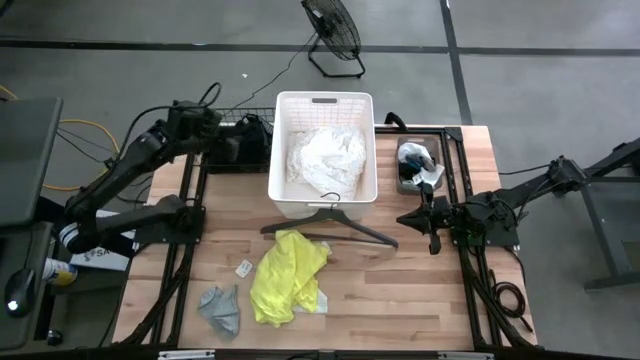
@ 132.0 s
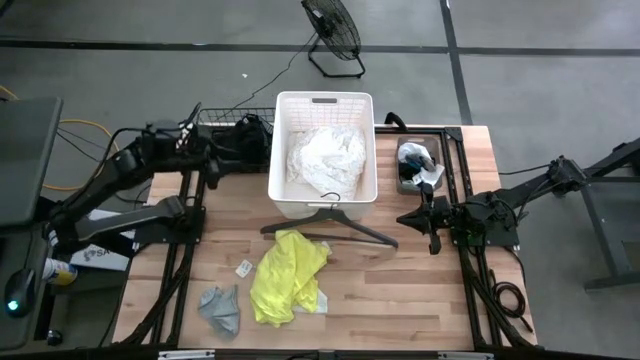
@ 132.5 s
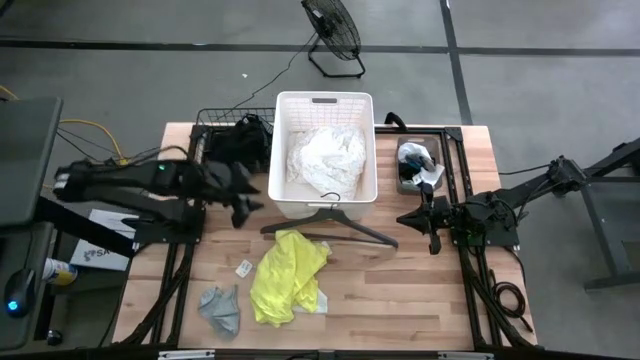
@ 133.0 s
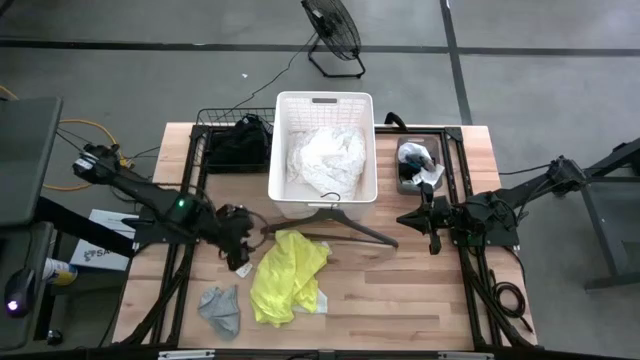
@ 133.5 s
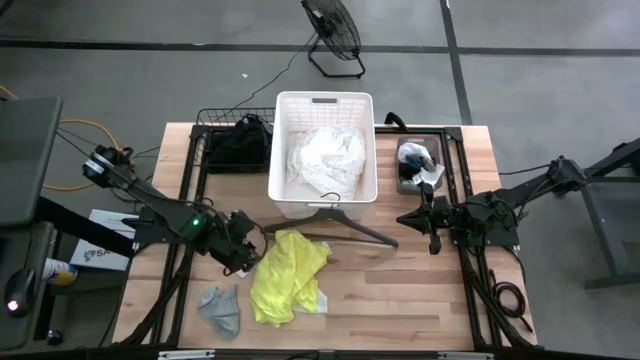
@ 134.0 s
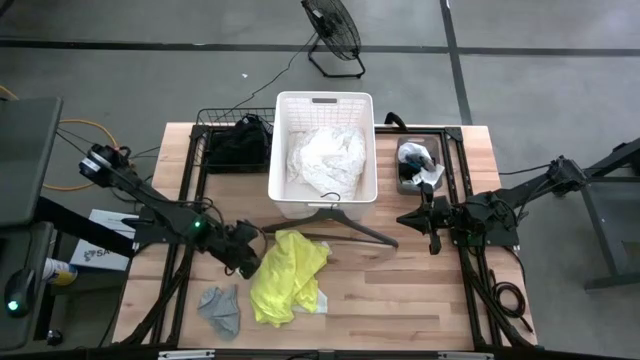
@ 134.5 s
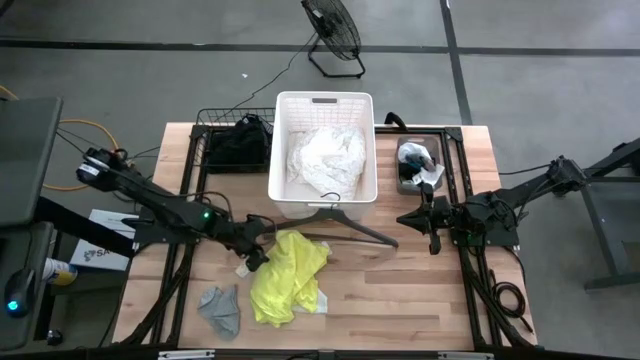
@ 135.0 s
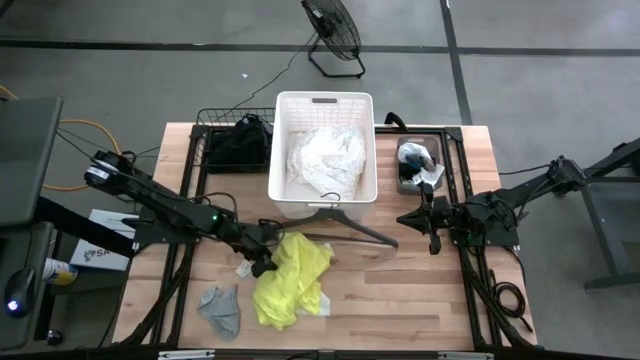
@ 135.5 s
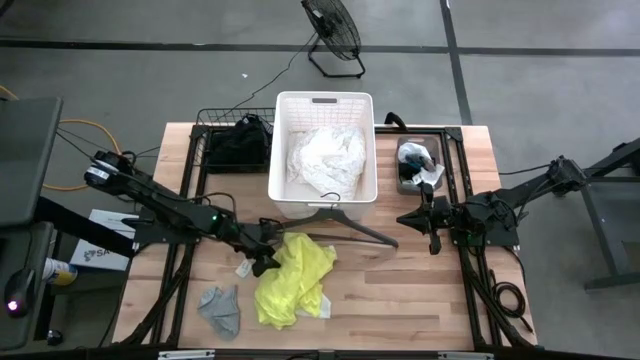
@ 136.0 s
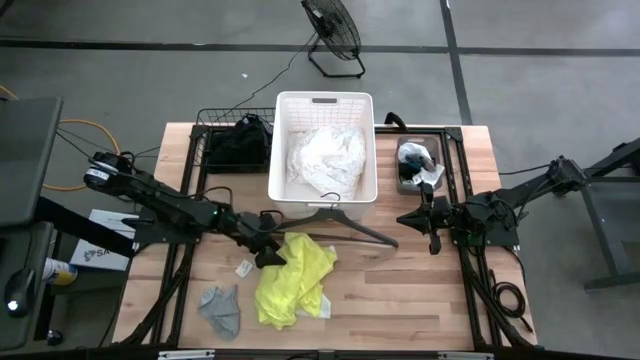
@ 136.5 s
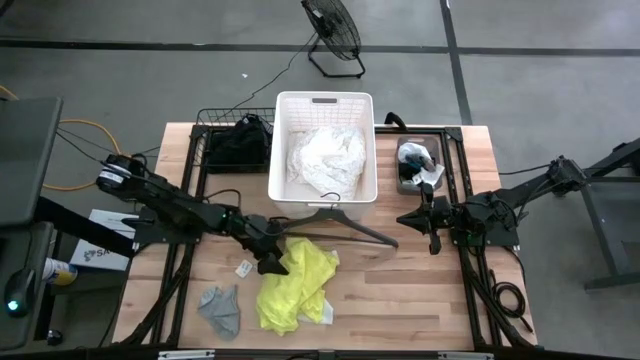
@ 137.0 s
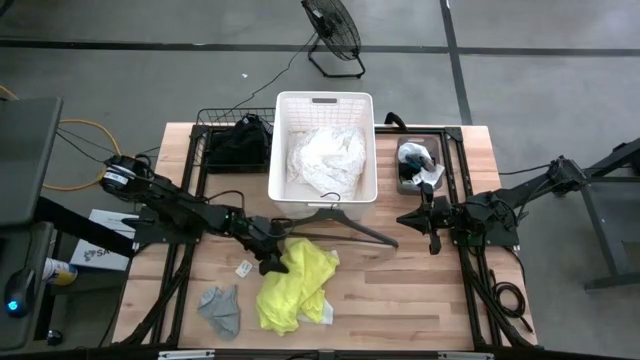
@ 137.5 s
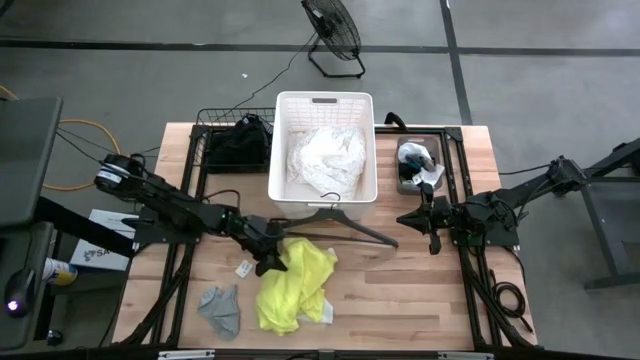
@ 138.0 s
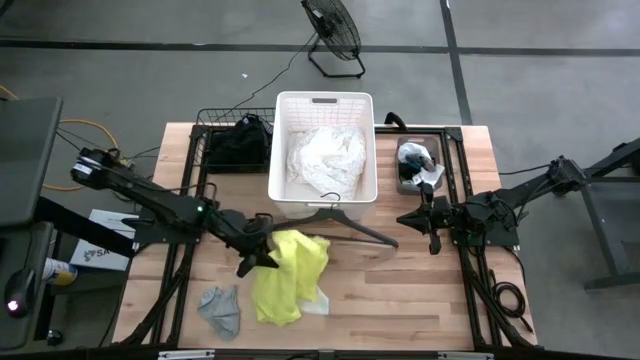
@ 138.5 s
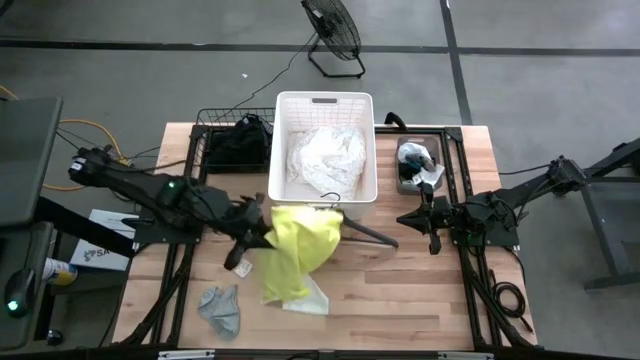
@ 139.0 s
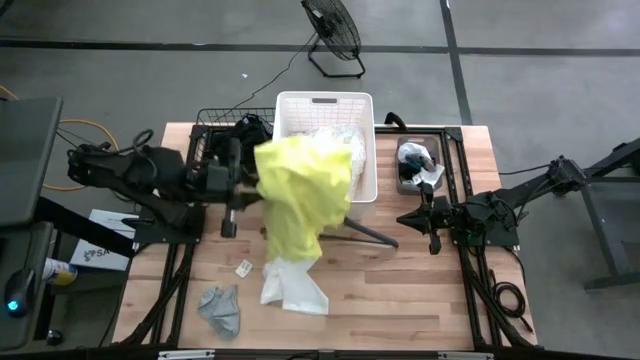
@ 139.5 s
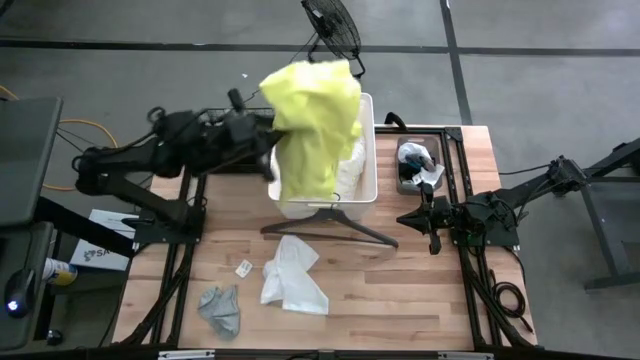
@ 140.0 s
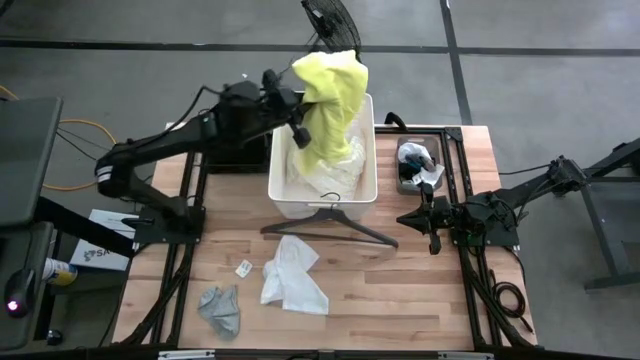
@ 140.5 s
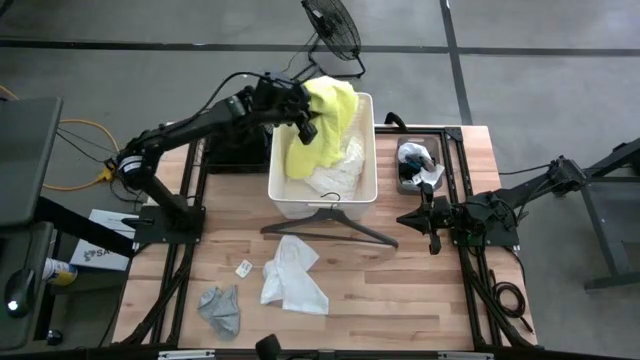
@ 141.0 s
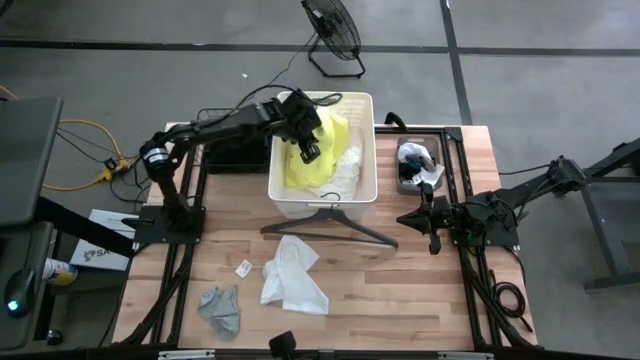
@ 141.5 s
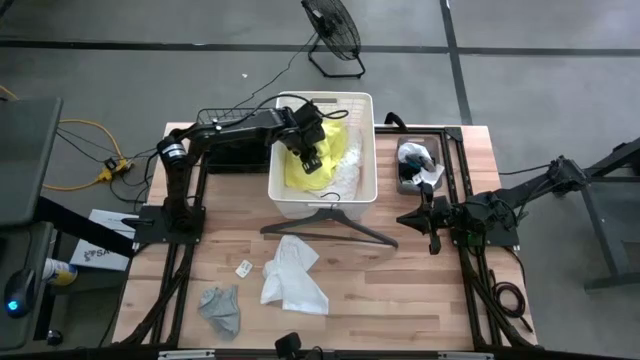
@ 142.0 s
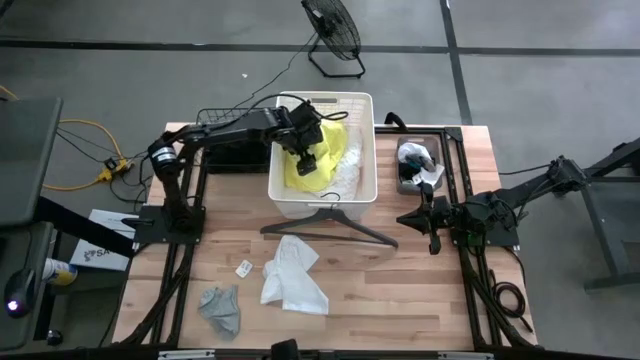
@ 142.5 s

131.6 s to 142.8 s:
Task: Pick & Place Cloths
Put the yellow shirt into the white bin

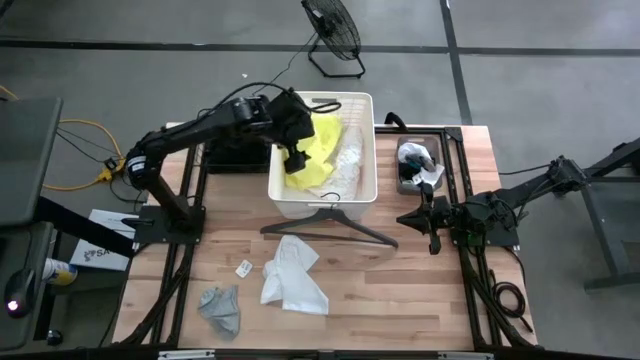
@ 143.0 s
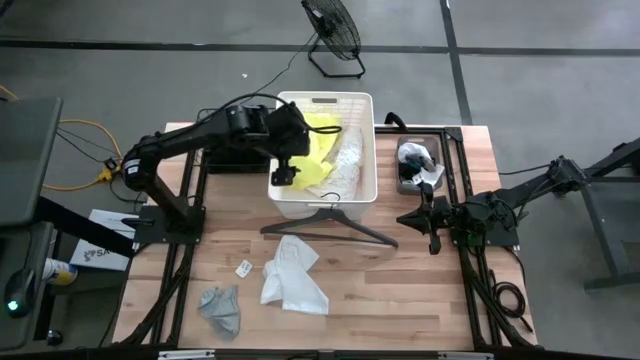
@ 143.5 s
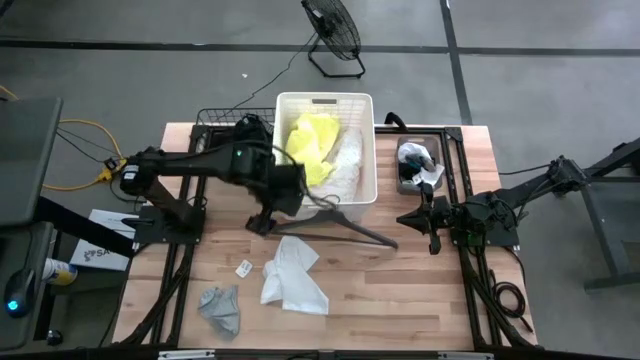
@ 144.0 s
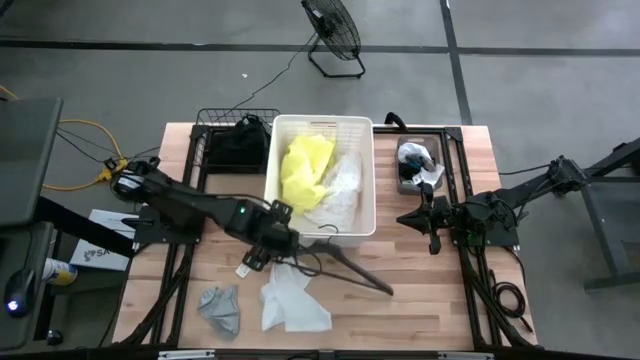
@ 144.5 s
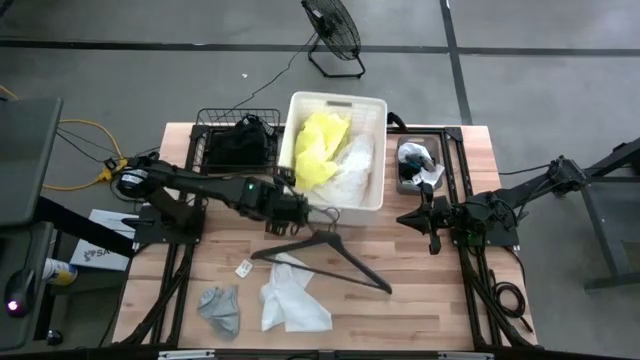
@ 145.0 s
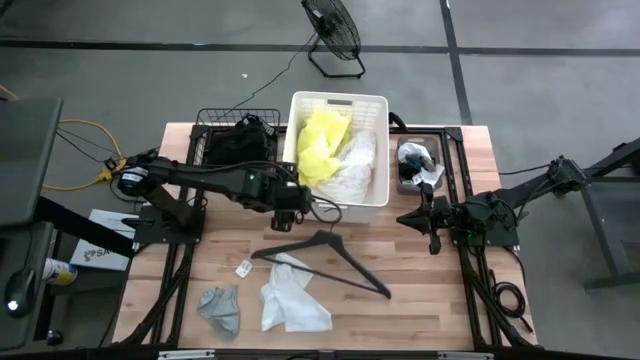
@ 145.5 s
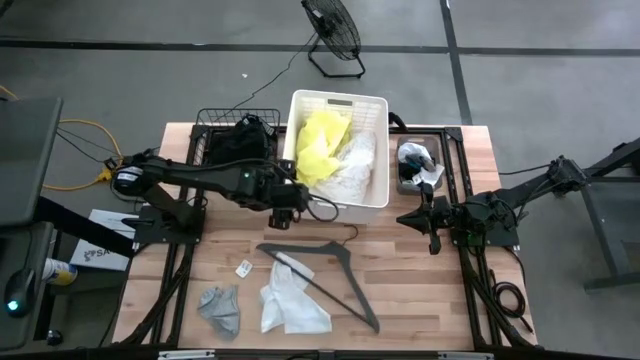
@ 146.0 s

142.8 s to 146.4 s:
Adjust the white bin

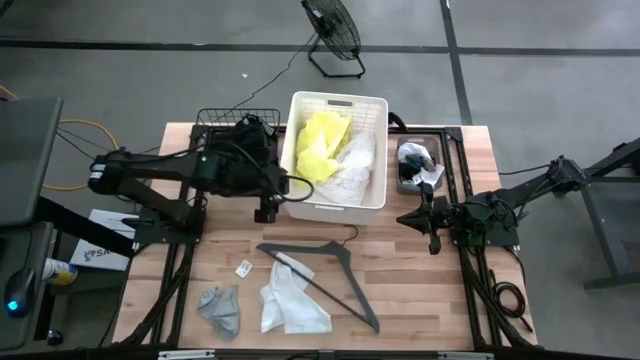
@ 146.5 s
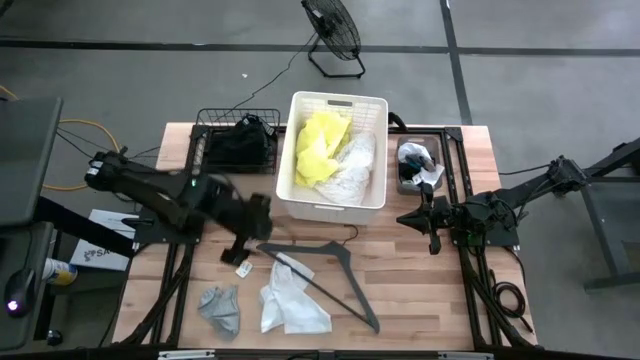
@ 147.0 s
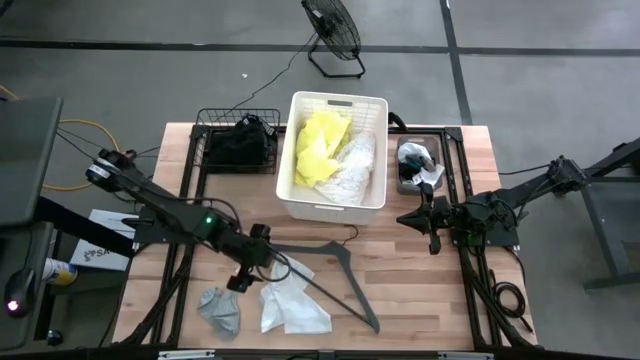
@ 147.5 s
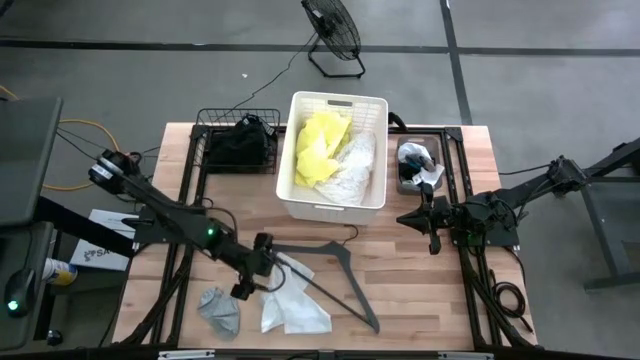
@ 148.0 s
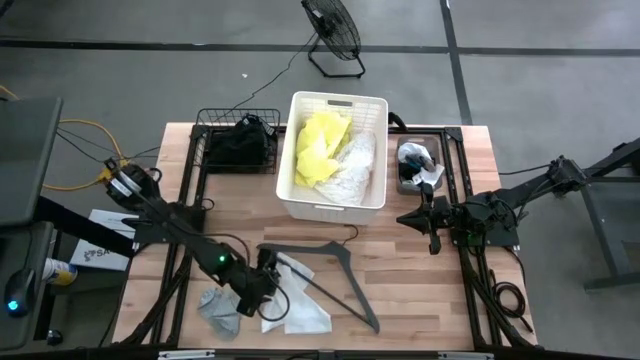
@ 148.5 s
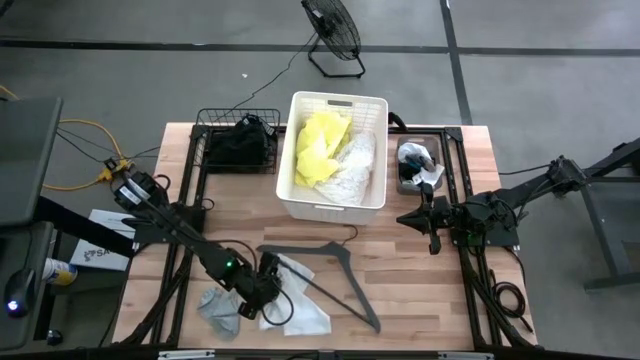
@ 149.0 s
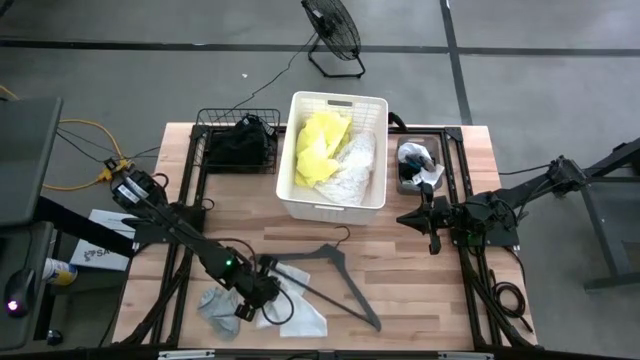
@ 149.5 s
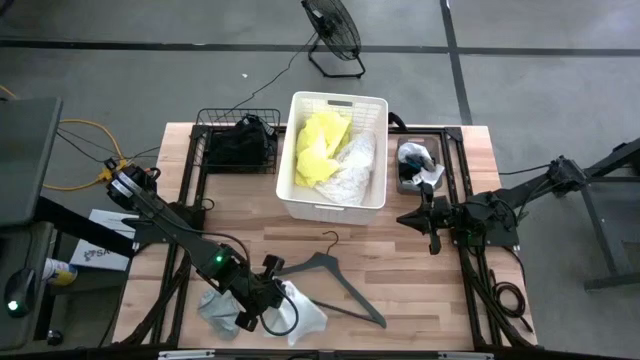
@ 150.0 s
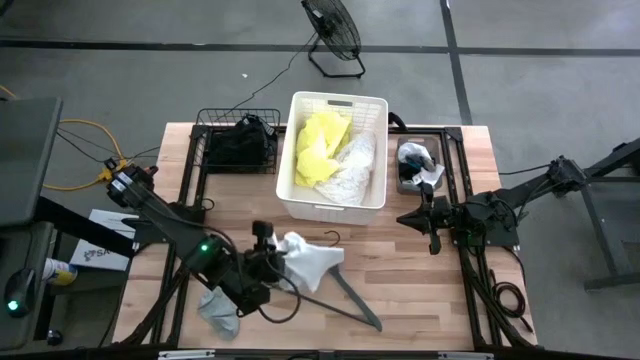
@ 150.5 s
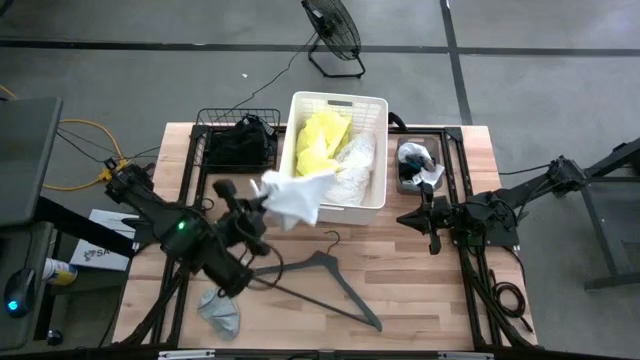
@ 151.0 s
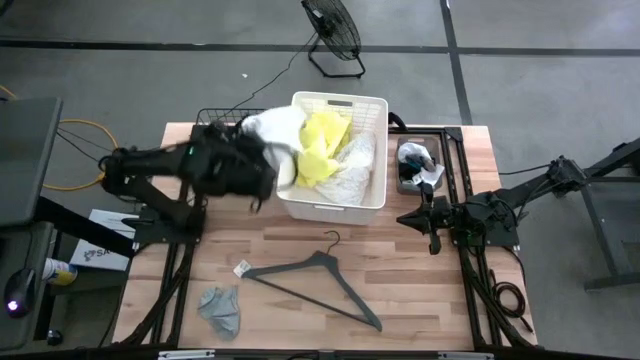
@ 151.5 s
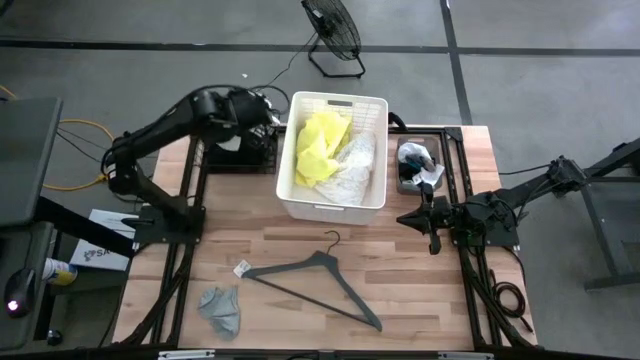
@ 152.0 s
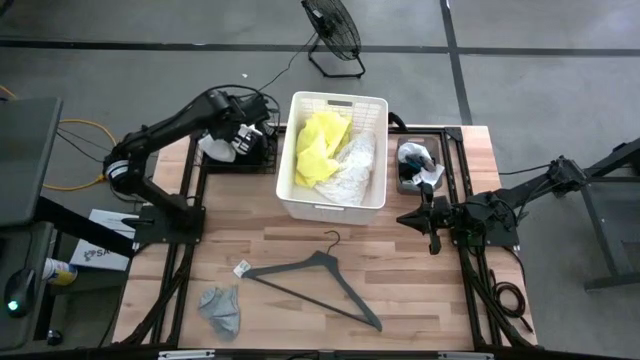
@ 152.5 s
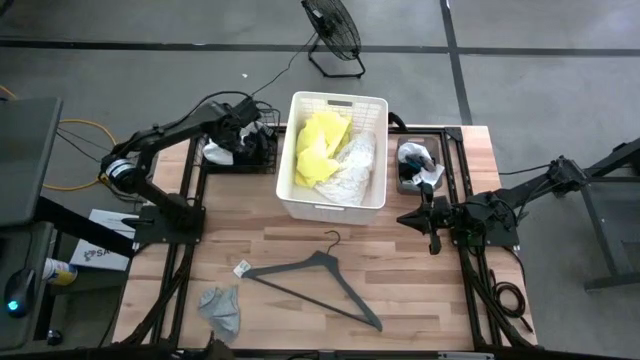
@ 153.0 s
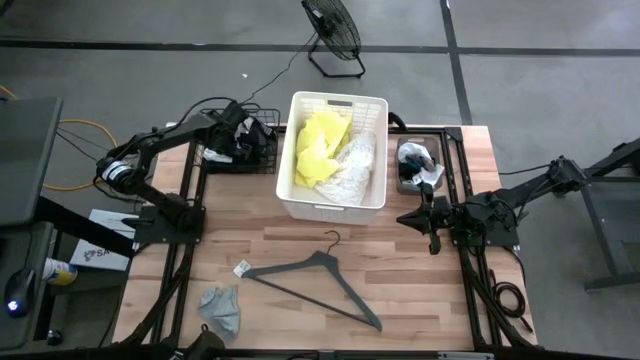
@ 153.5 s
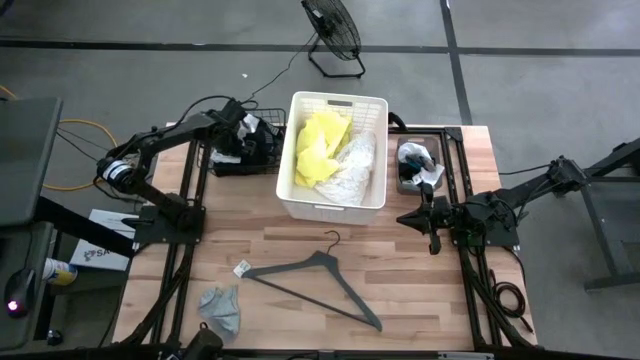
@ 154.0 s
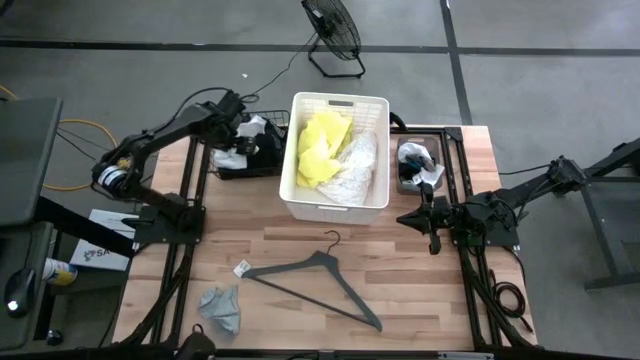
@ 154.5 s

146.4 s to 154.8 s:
Put the white underwear into the wire basket
